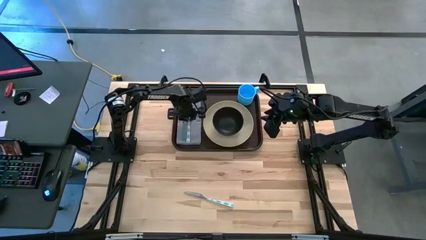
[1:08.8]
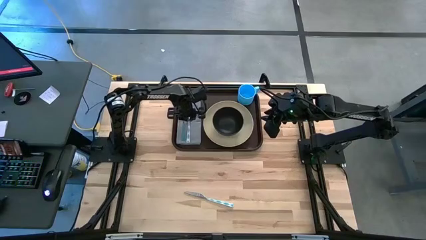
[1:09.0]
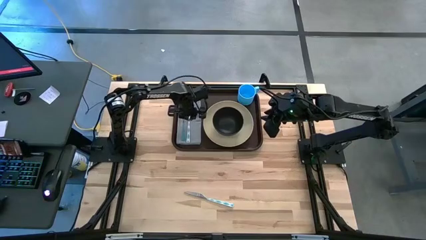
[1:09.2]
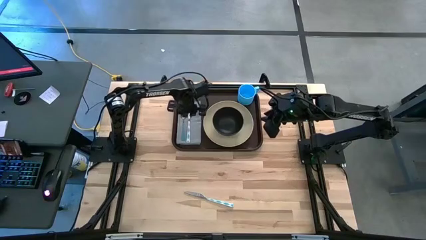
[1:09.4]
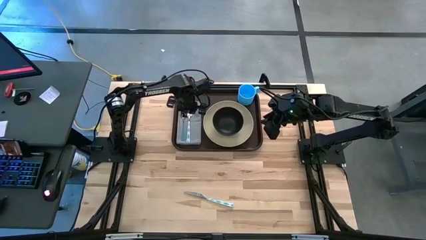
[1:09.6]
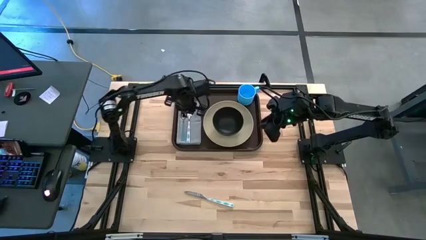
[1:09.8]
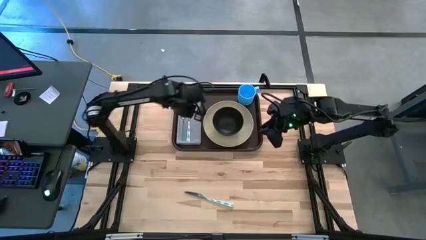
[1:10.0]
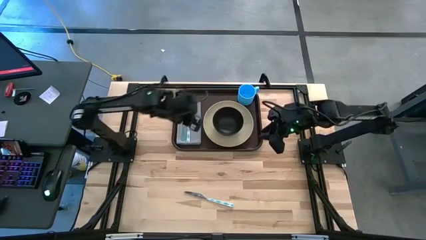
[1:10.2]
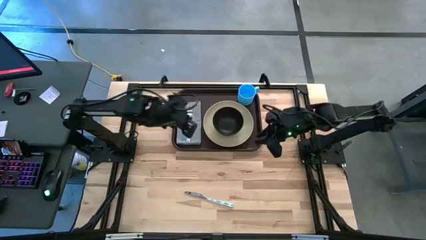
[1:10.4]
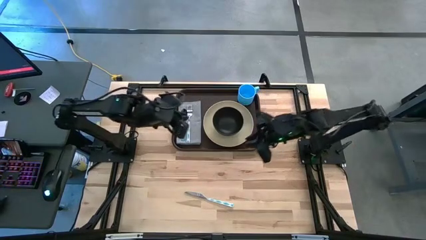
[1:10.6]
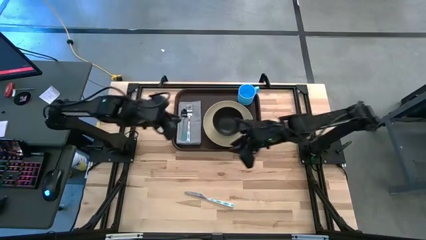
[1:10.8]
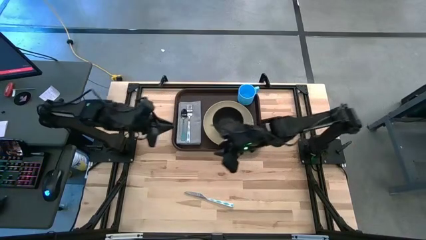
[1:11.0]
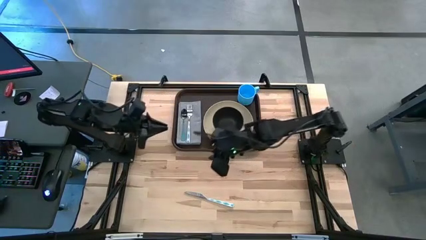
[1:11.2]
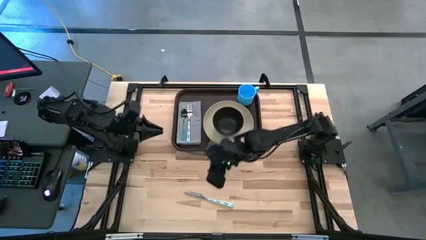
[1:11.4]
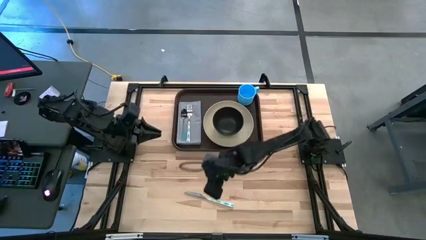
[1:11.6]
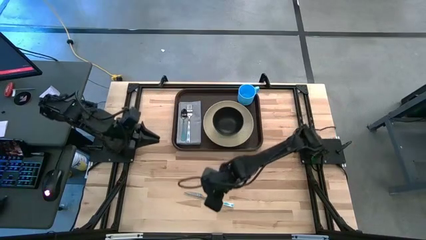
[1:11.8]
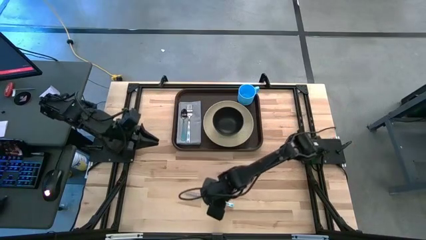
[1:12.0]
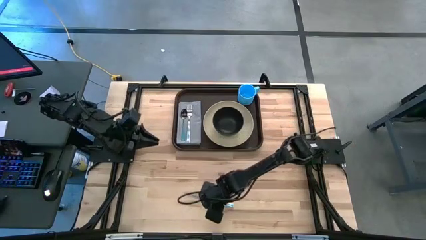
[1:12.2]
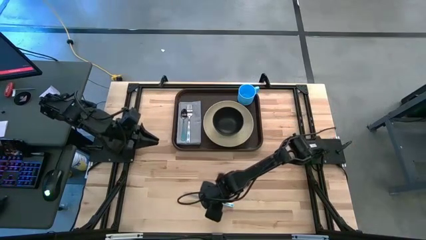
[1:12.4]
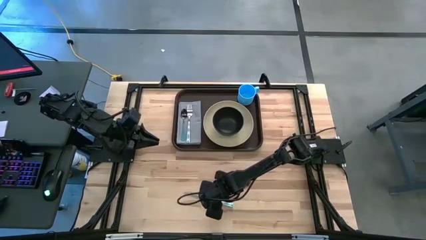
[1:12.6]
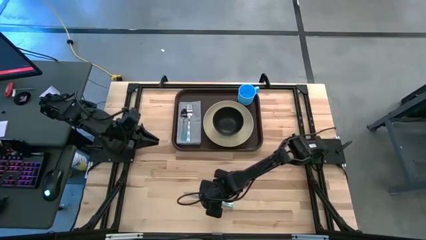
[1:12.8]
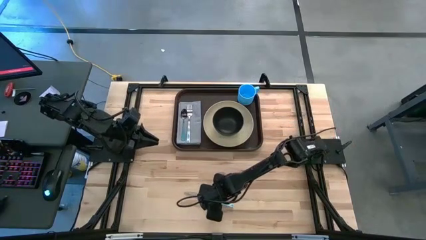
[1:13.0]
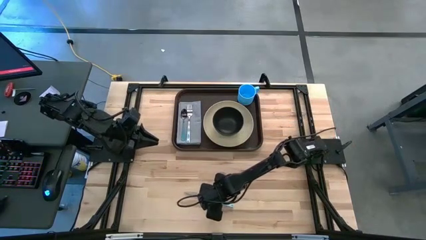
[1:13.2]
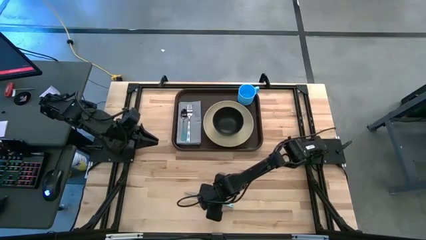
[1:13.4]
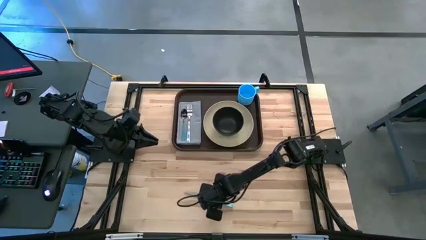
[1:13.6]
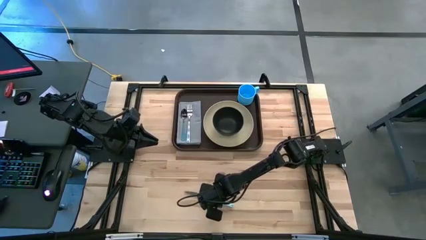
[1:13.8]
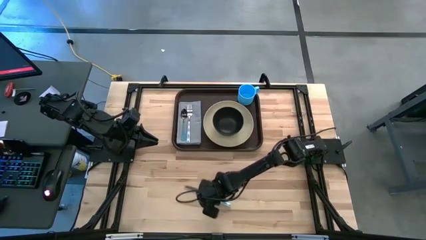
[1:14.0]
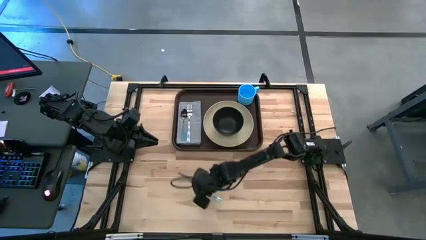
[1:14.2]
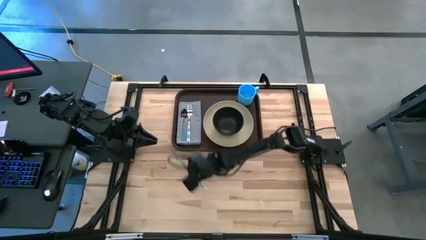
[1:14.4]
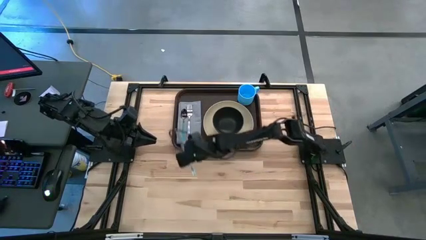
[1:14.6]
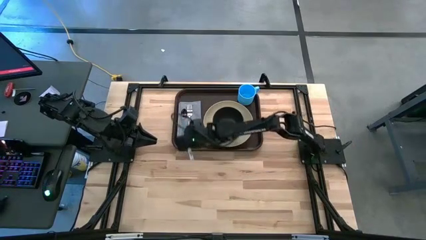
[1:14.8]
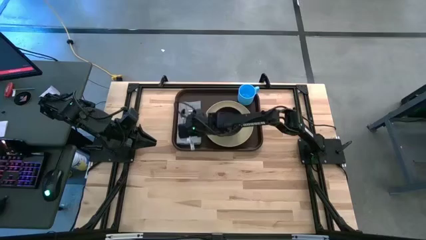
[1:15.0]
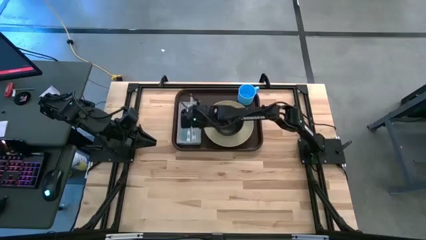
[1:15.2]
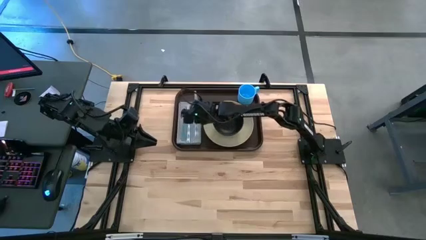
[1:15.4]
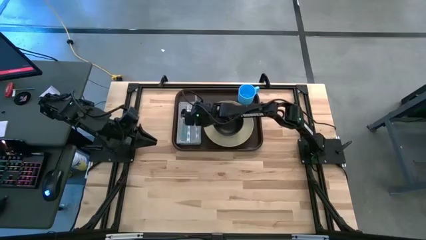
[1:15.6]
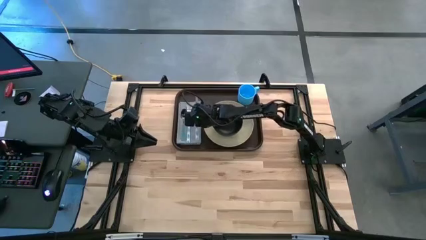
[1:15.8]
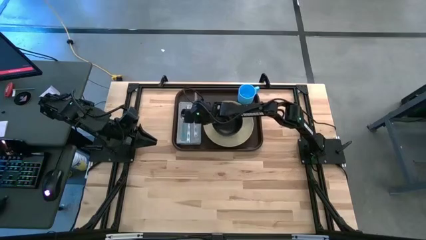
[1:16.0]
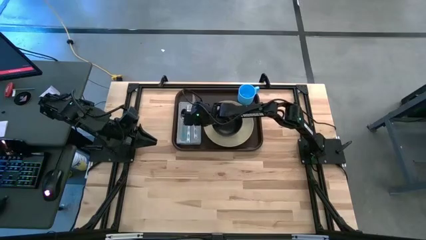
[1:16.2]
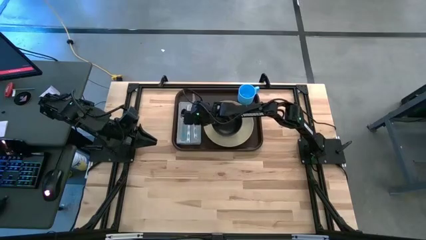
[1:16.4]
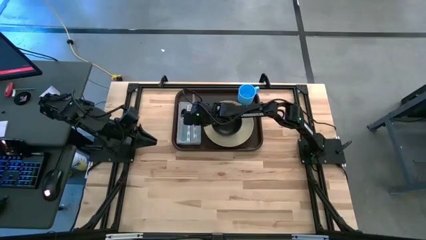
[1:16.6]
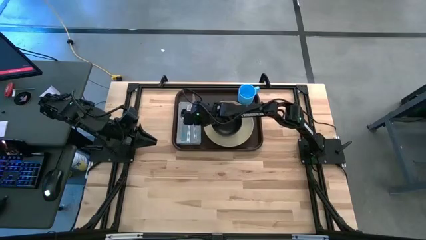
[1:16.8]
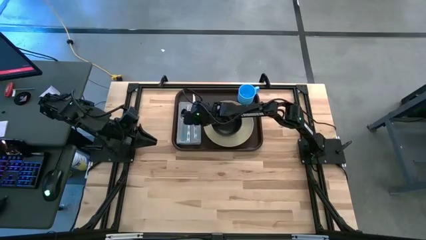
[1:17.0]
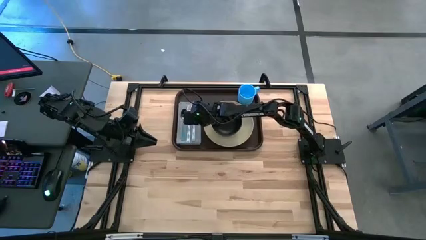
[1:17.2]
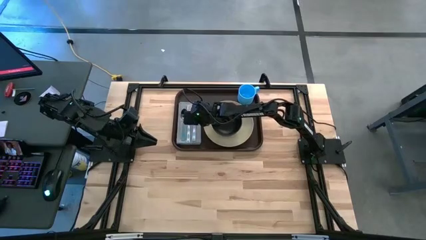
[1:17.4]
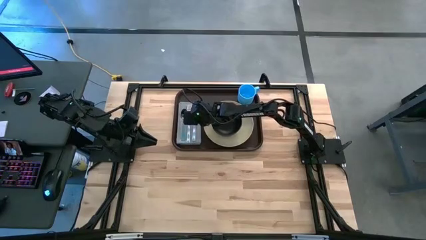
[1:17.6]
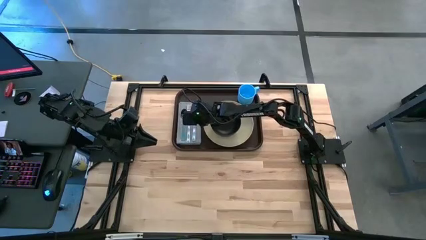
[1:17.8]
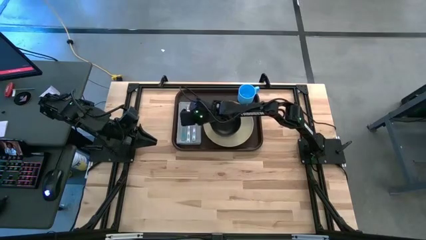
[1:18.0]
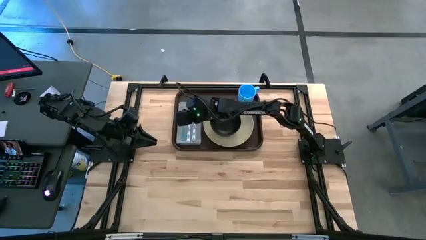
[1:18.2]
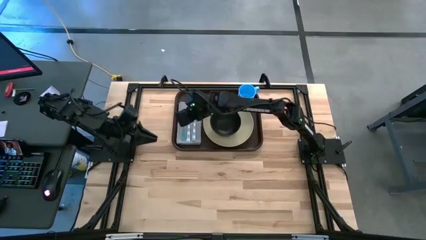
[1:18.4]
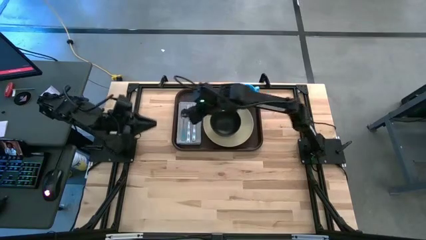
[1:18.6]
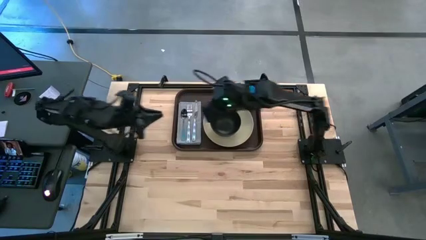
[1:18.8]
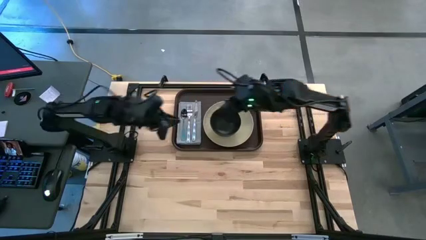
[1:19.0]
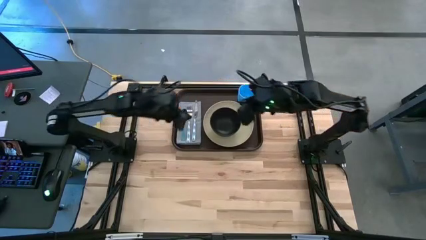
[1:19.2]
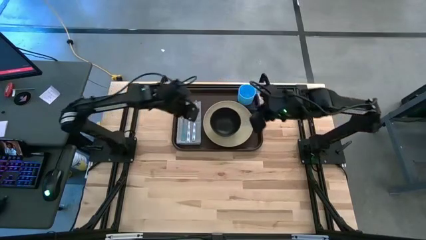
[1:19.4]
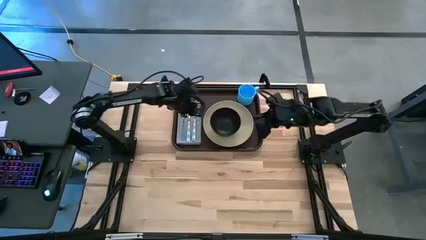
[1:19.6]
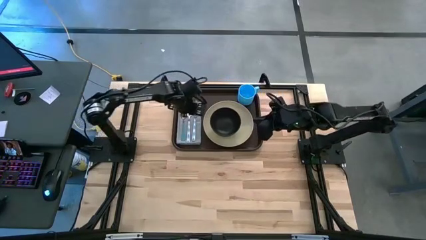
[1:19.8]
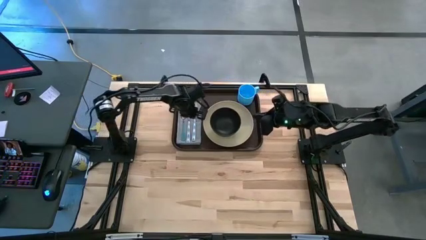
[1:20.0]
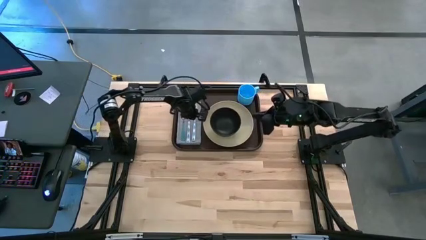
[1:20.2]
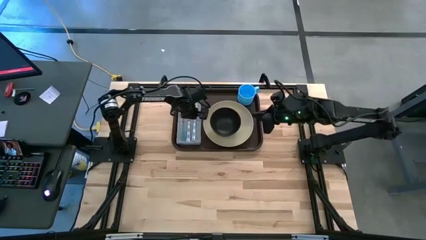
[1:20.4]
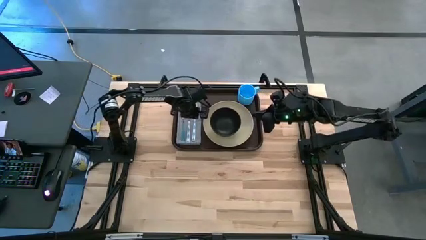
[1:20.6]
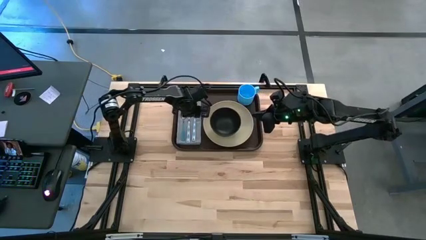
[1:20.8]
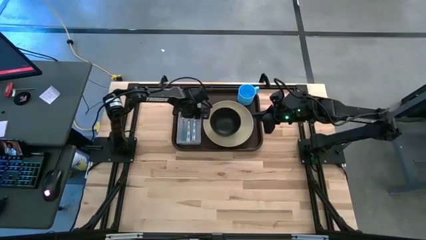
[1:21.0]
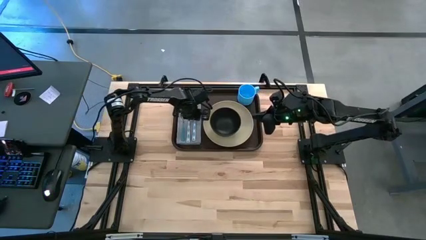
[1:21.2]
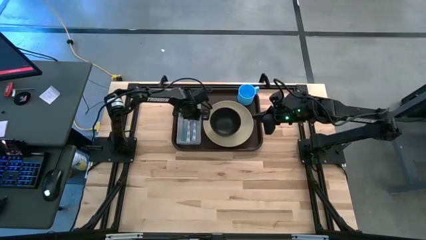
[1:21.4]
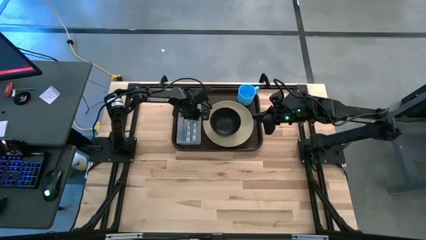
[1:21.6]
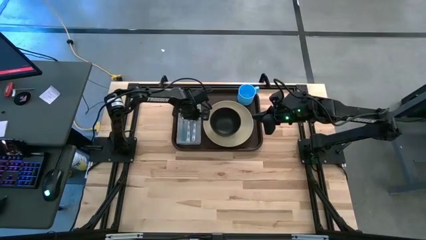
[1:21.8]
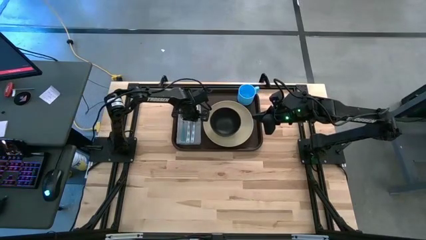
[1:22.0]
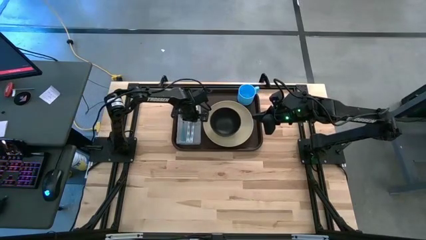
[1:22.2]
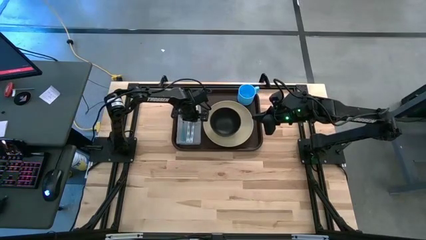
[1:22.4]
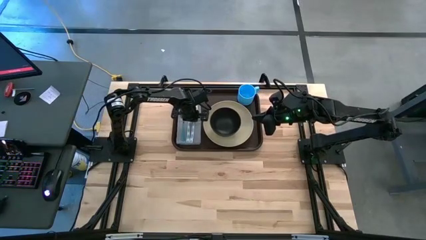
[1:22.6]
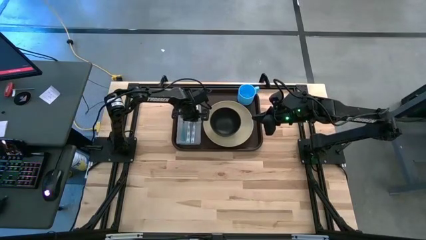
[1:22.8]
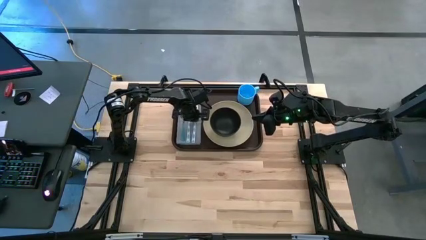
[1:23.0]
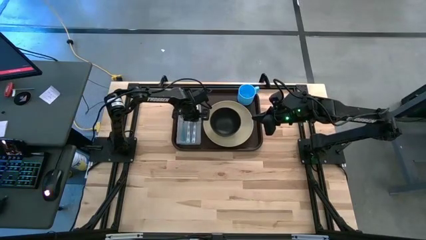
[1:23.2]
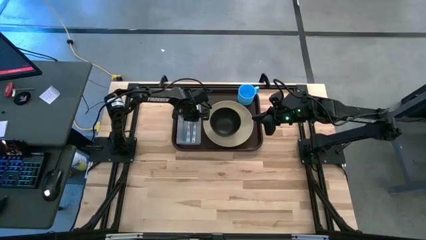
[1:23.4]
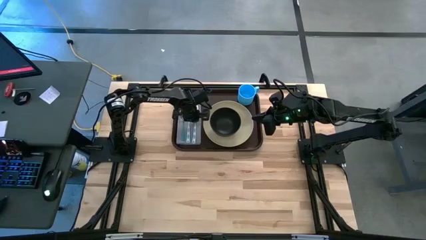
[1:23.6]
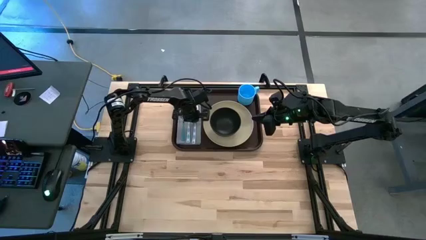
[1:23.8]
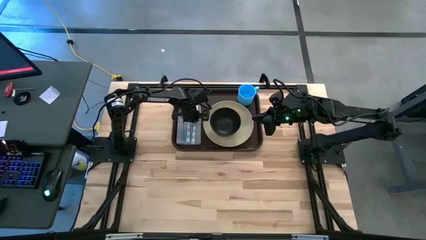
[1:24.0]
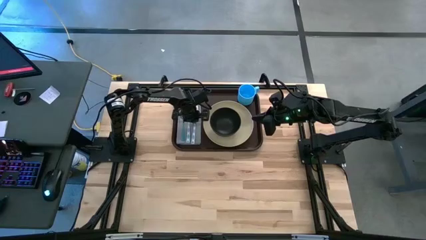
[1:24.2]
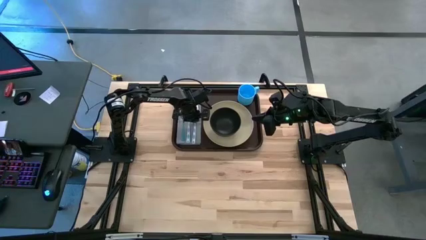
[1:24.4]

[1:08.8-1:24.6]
Task: Set up tray
Put the blue knife on the gray napkin to the right of the blue fork
